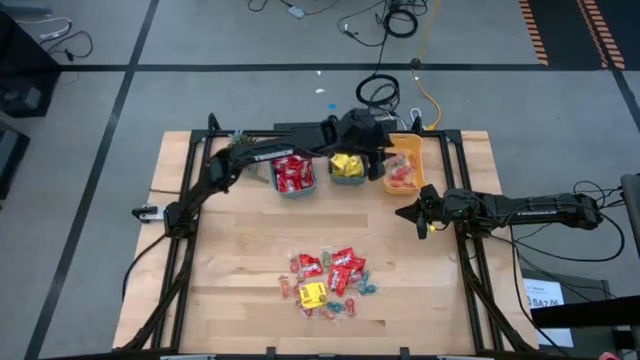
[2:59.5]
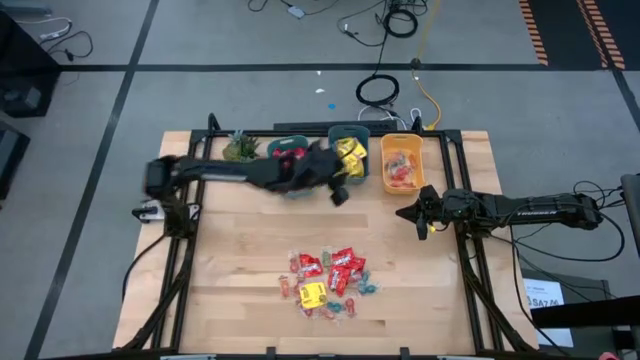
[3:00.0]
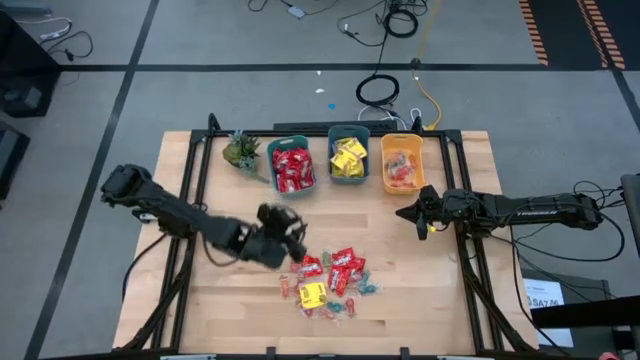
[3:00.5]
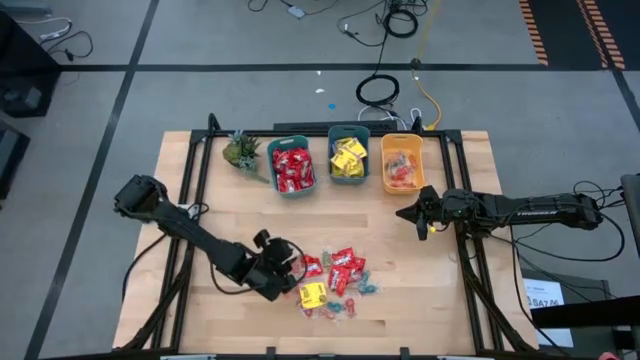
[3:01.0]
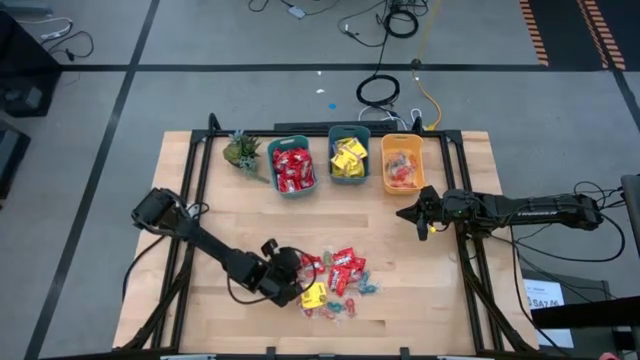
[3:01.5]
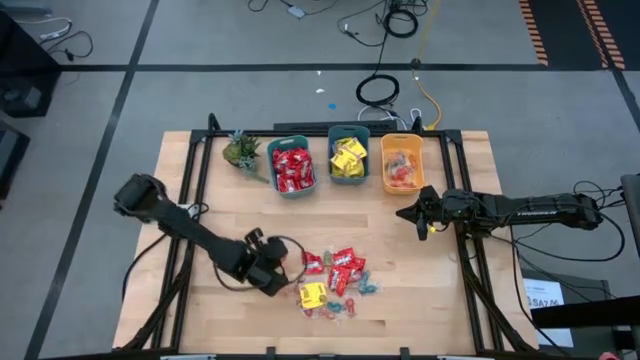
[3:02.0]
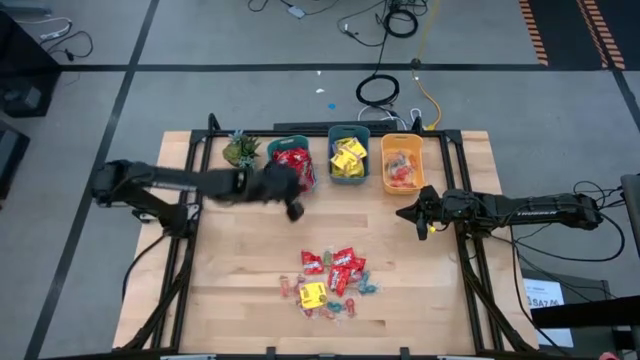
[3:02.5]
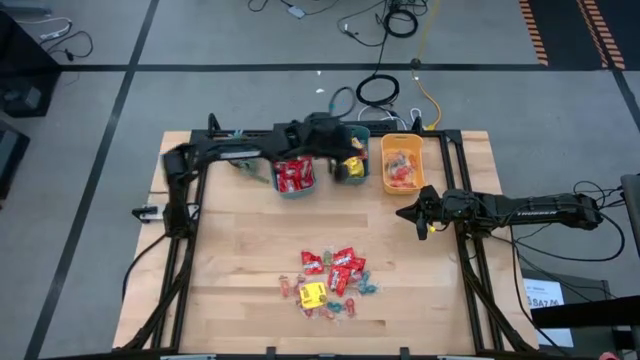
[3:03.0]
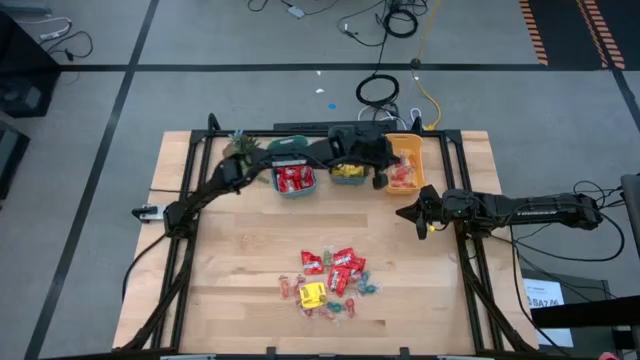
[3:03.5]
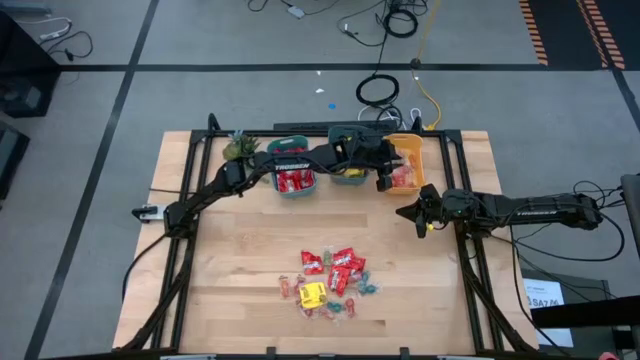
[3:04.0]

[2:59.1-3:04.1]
Task: Sort candy
Put the red gummy candy into the yellow bin

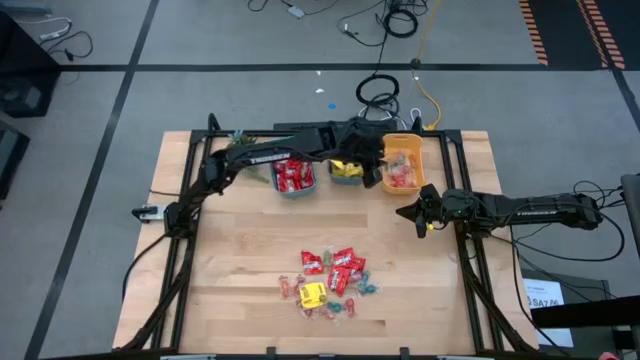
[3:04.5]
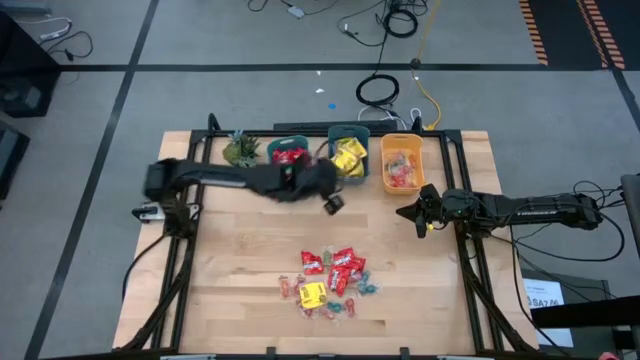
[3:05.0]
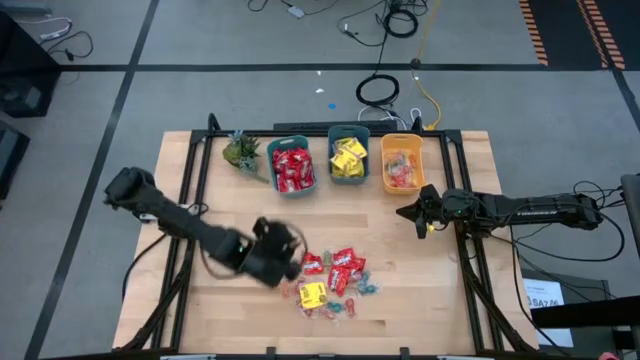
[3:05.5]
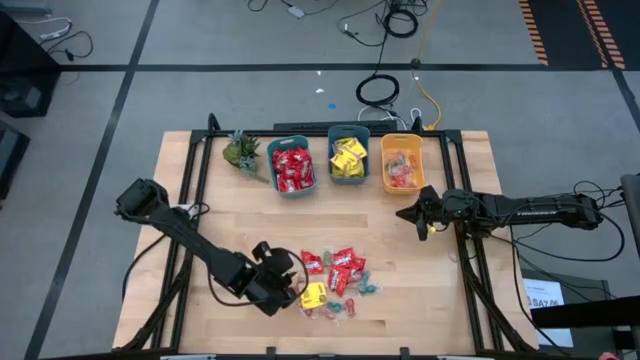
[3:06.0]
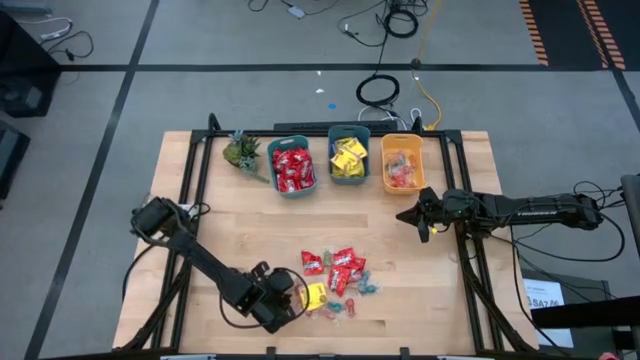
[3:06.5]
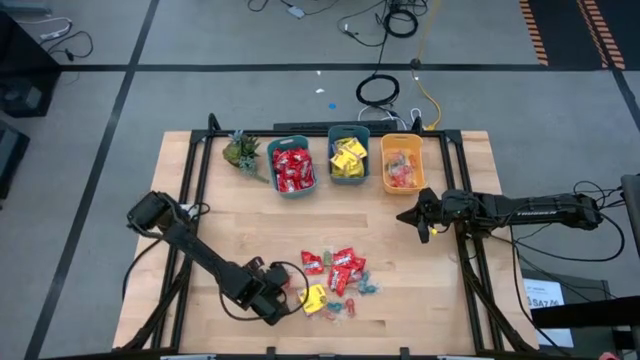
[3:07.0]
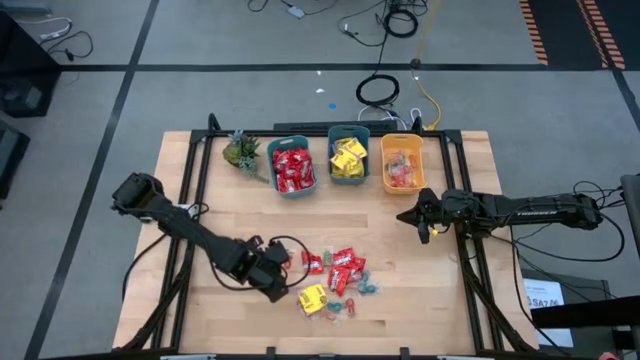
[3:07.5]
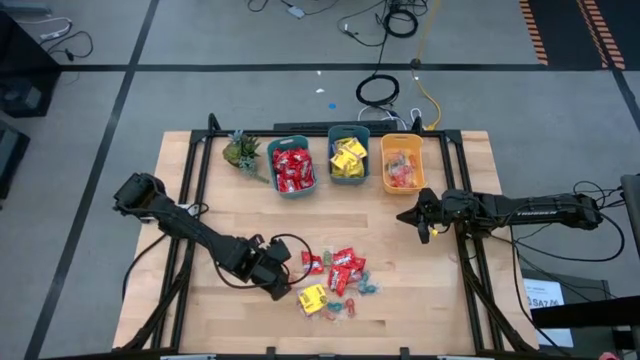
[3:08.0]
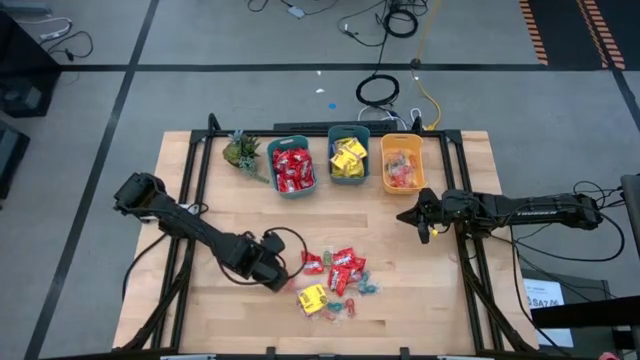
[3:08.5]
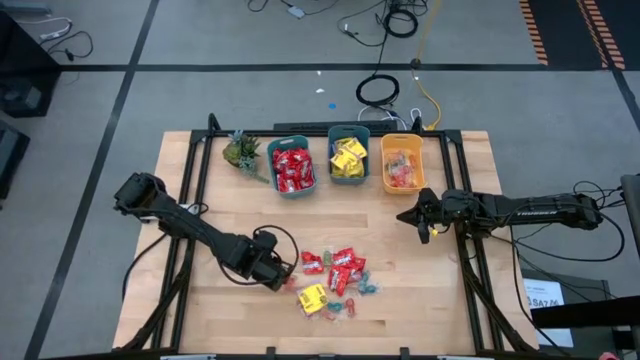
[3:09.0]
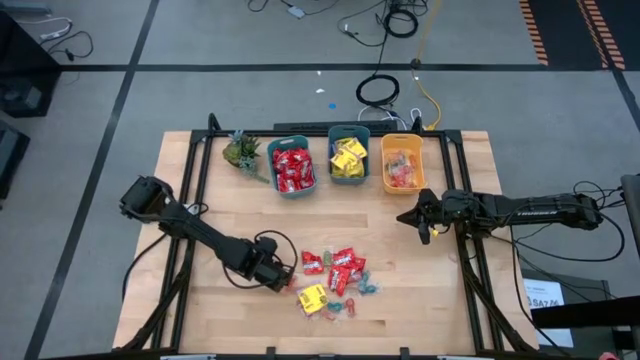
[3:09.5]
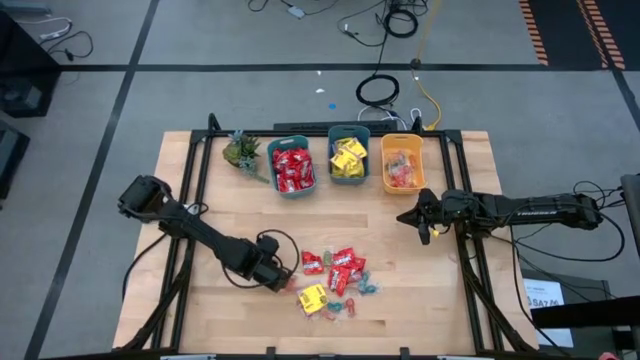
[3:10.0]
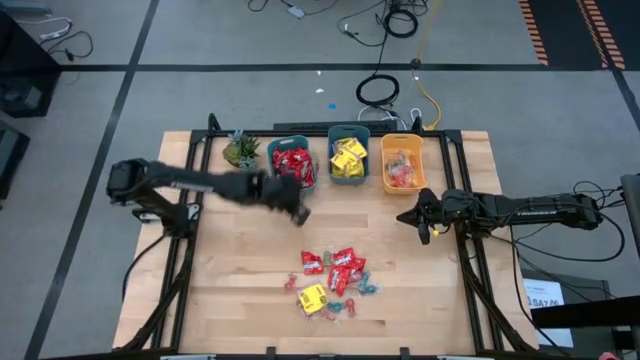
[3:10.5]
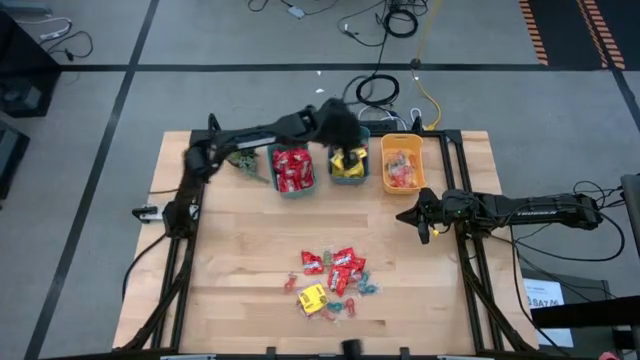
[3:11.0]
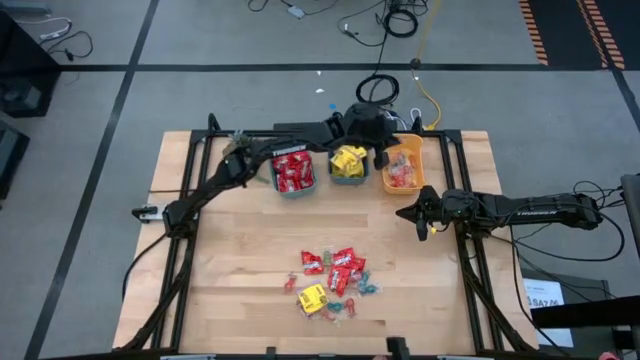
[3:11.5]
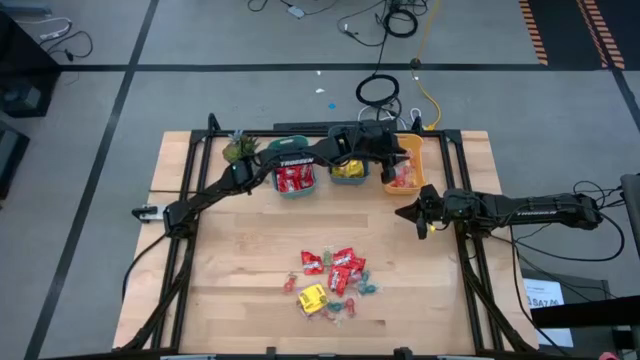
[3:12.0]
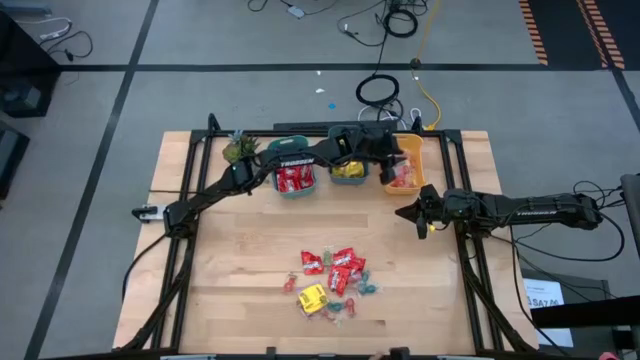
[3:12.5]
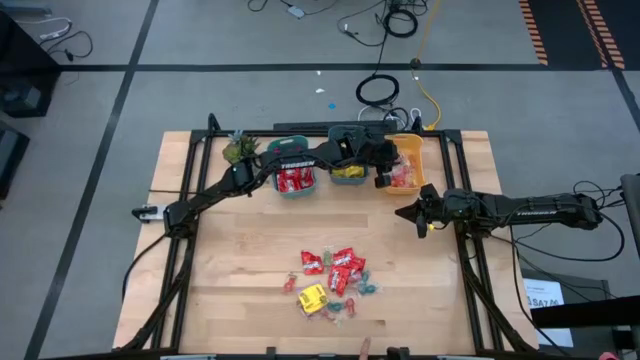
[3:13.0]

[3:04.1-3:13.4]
Put the orange gummy candy into the yellow bin

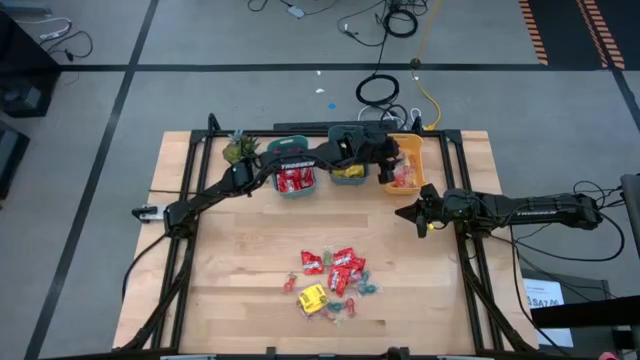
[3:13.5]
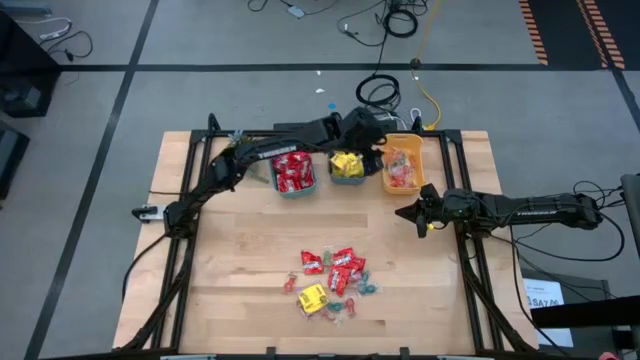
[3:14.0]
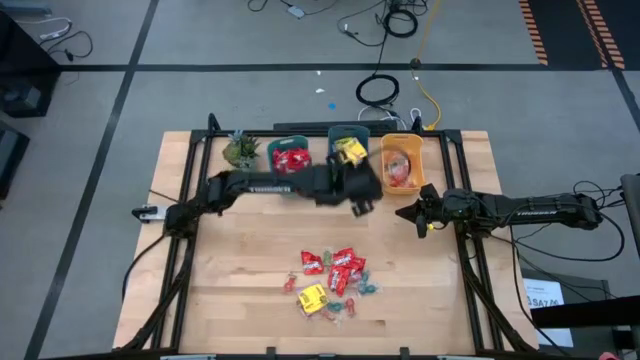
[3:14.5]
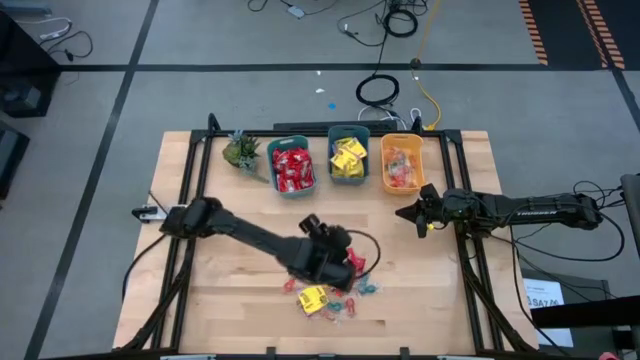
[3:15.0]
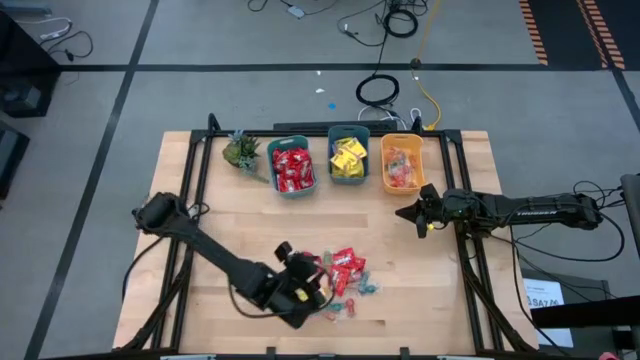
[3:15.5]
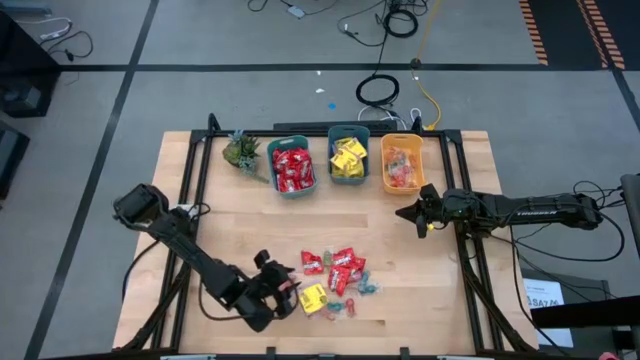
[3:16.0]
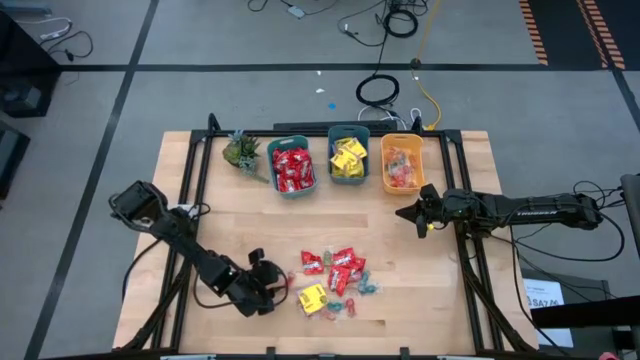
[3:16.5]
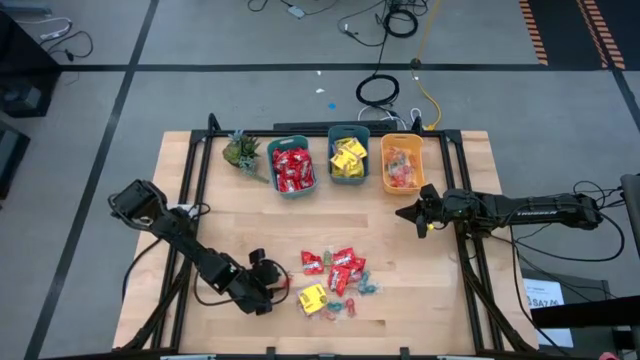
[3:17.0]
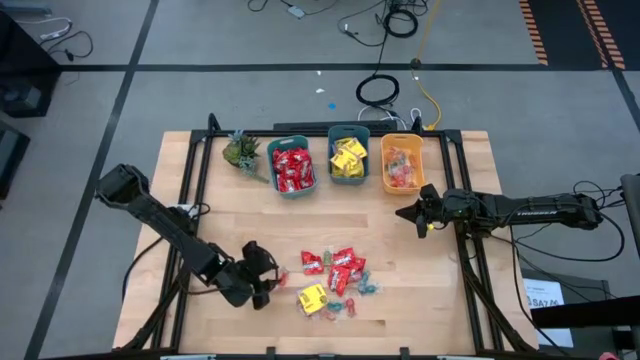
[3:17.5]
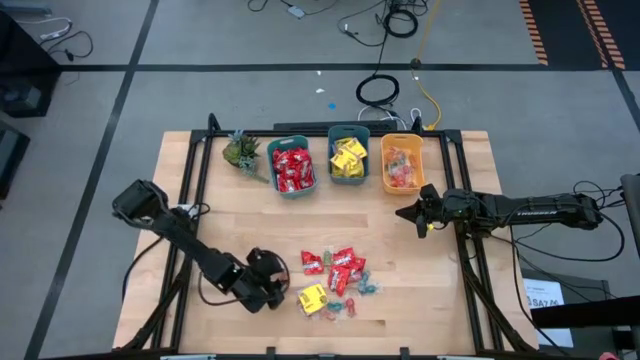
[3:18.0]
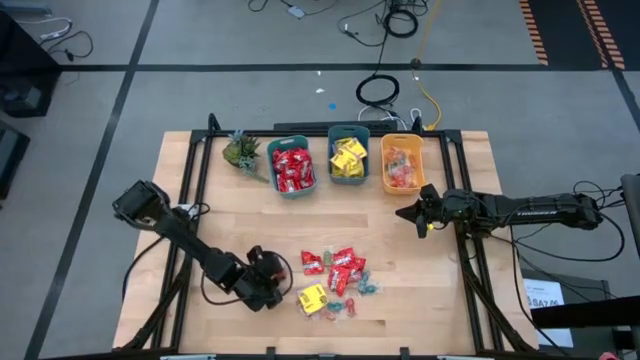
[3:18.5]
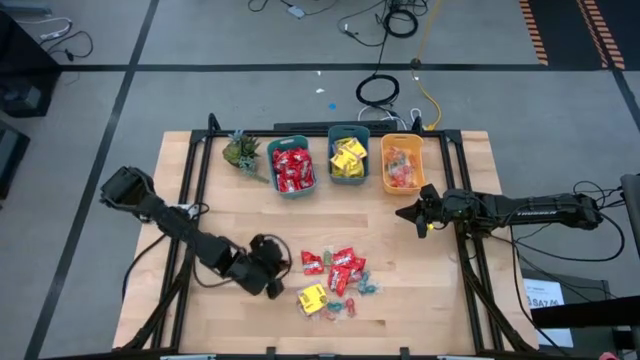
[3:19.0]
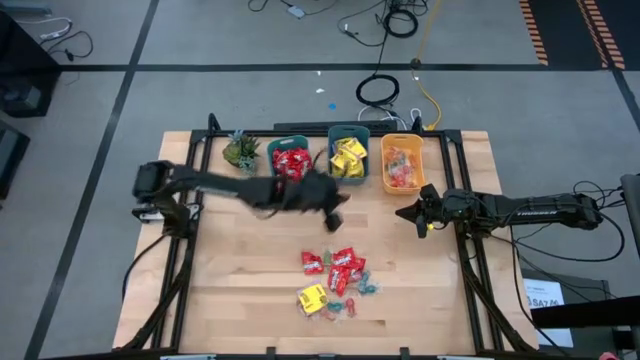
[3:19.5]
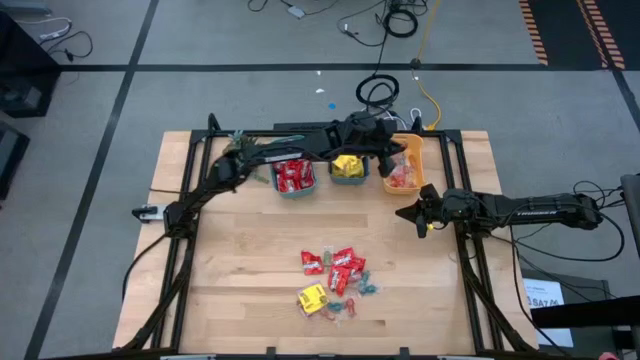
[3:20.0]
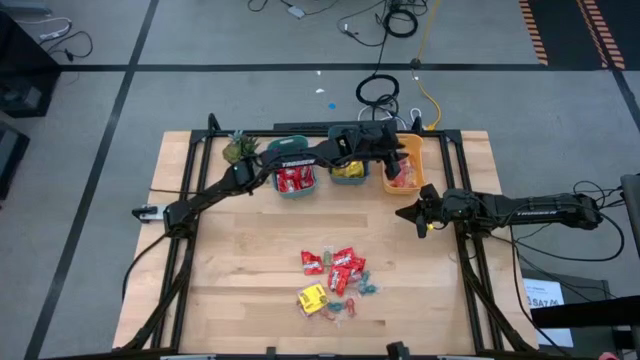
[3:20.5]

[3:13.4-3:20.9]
Put the orange gummy candy into the yellow bin
